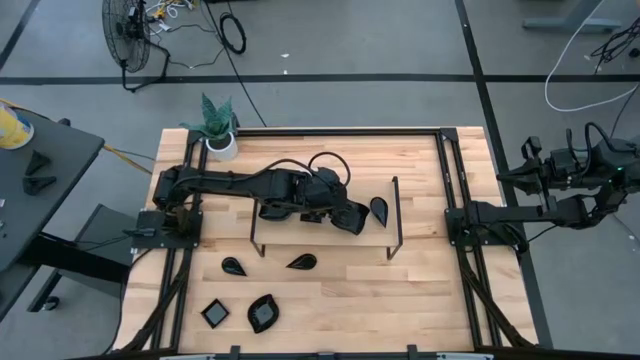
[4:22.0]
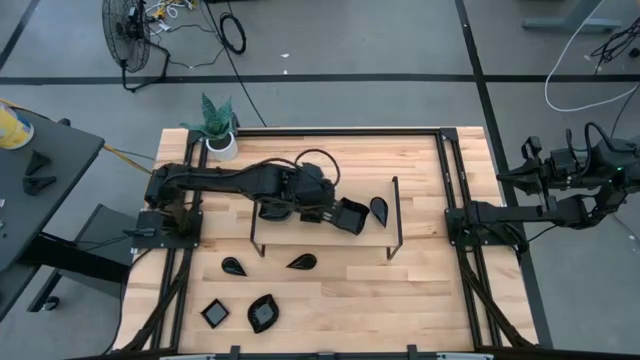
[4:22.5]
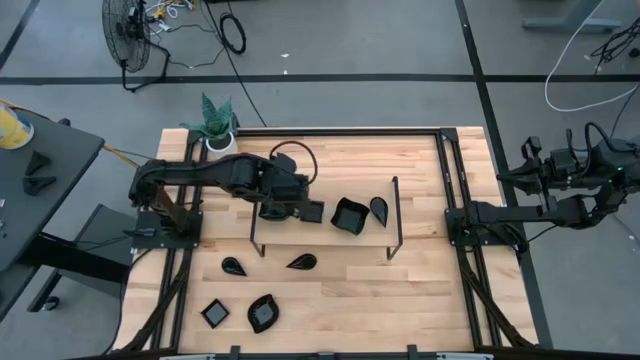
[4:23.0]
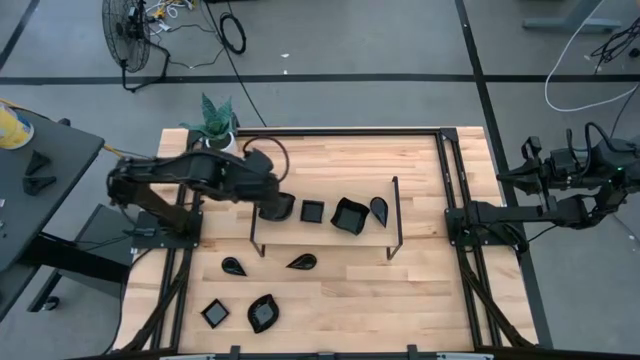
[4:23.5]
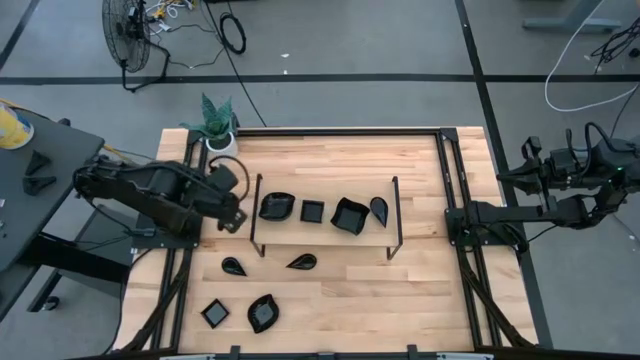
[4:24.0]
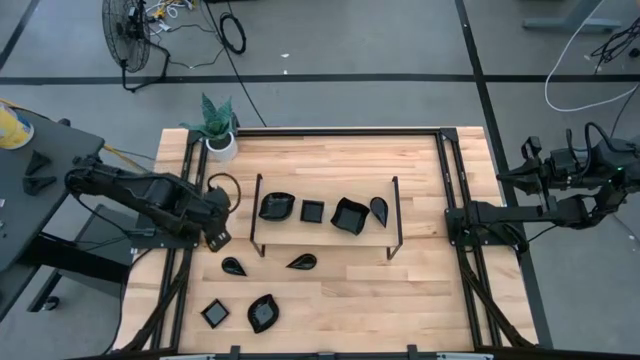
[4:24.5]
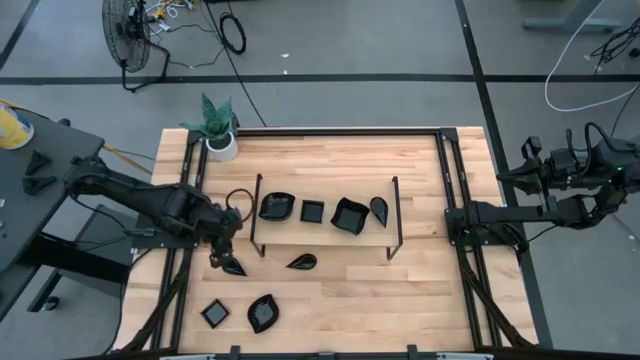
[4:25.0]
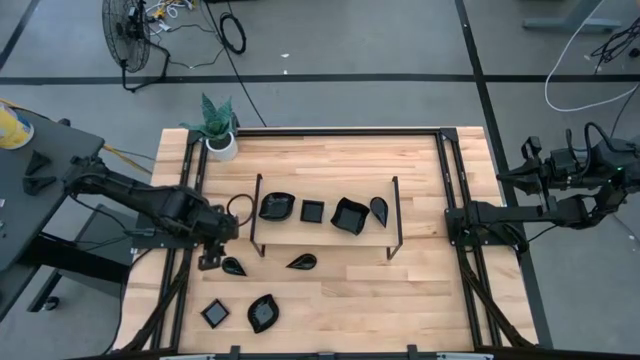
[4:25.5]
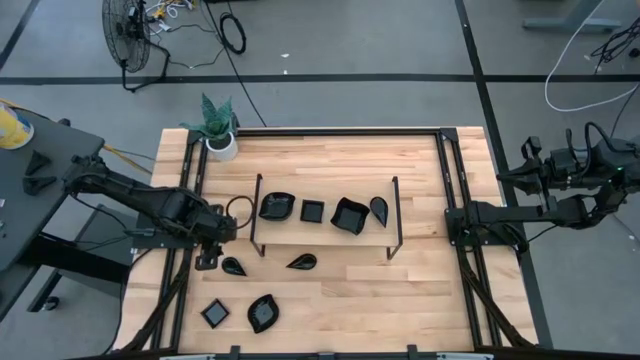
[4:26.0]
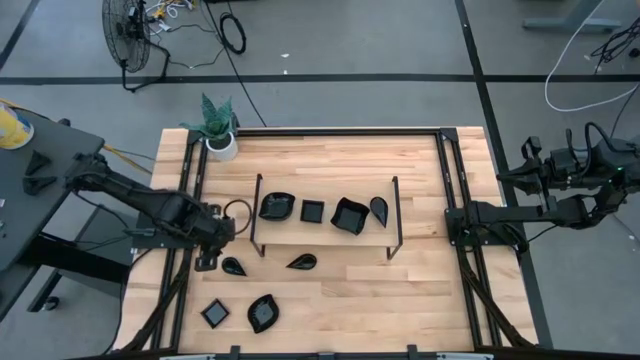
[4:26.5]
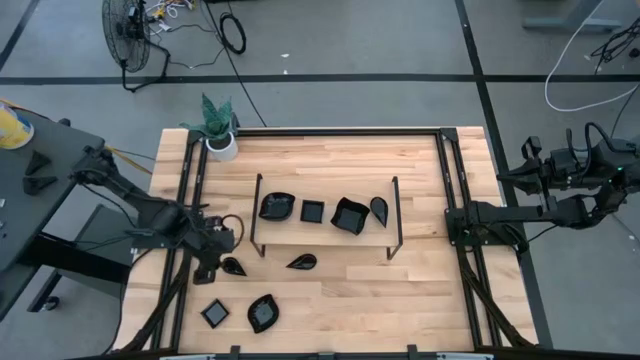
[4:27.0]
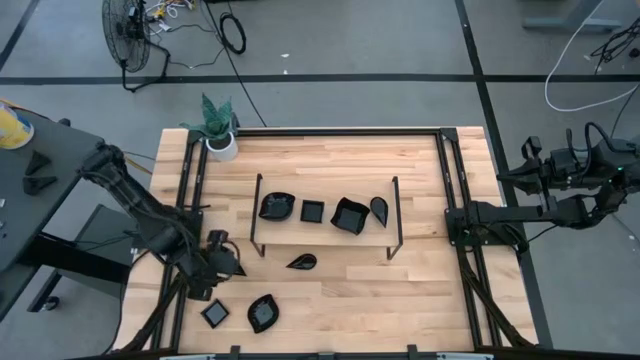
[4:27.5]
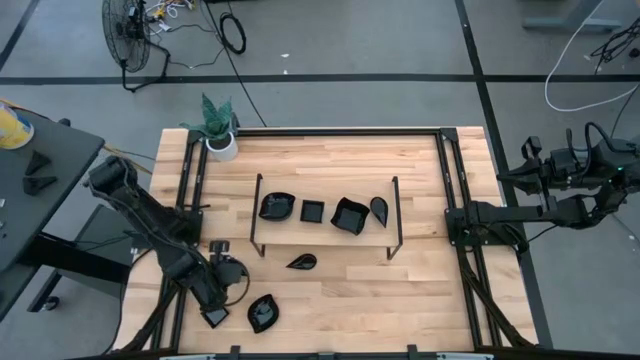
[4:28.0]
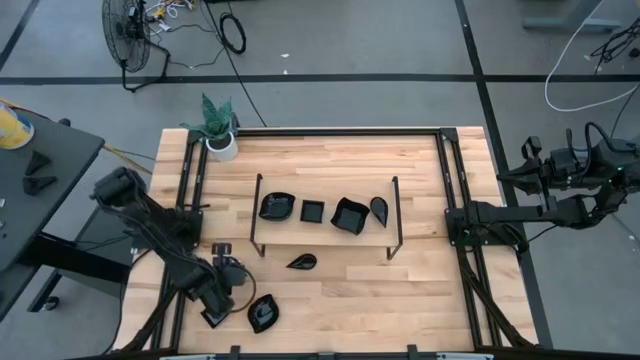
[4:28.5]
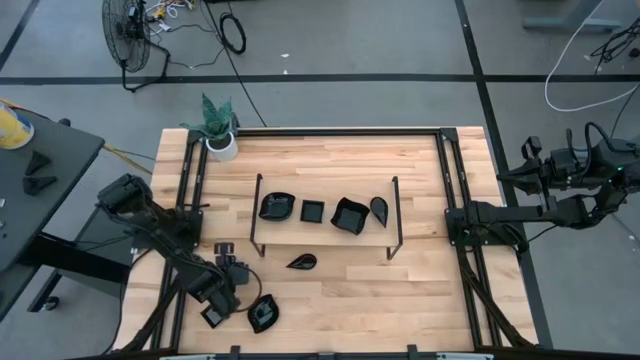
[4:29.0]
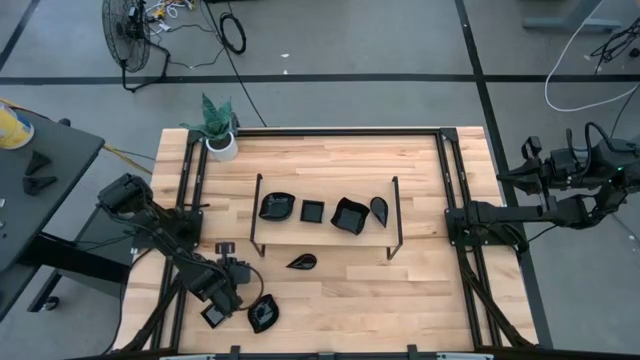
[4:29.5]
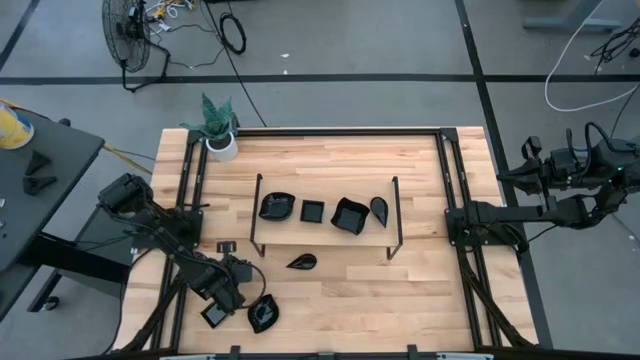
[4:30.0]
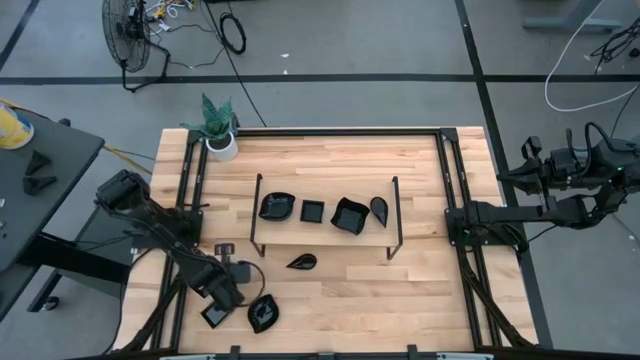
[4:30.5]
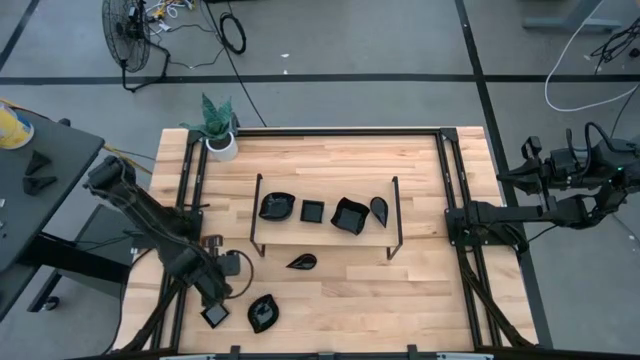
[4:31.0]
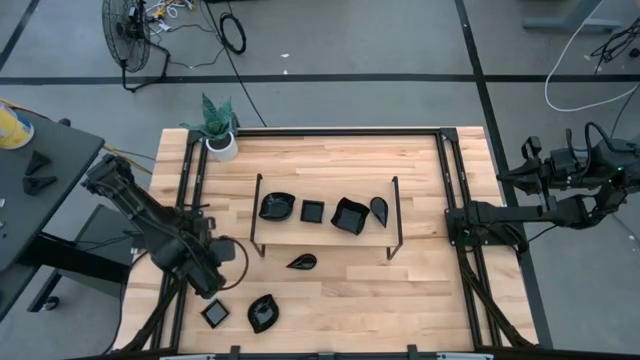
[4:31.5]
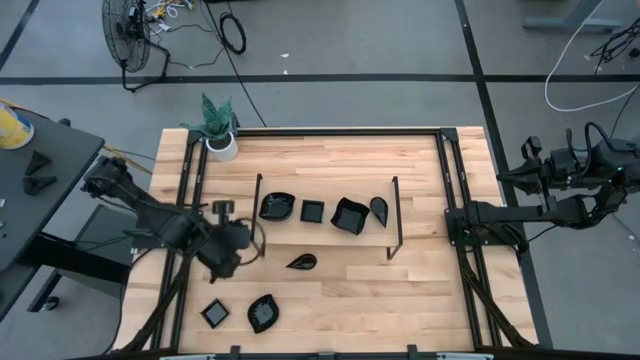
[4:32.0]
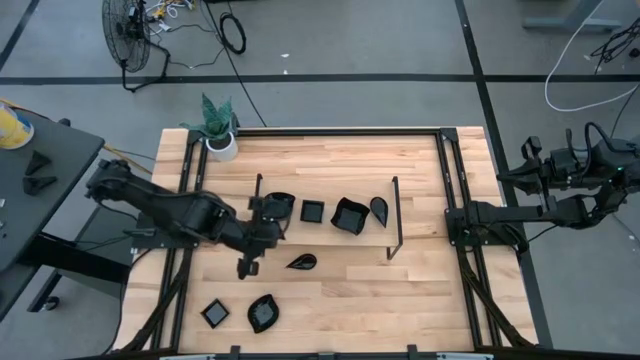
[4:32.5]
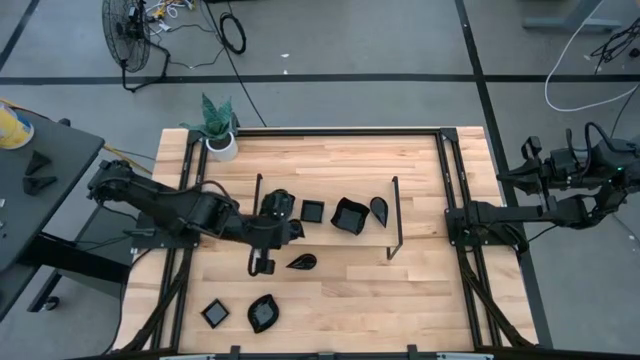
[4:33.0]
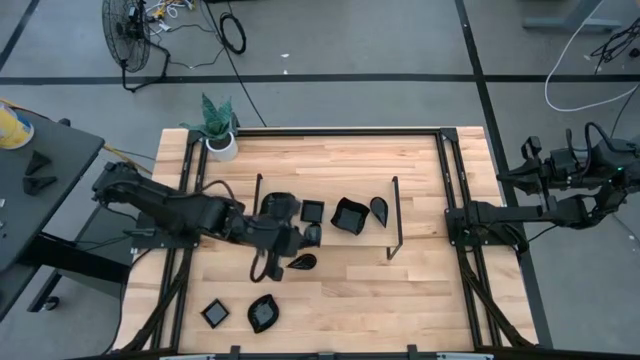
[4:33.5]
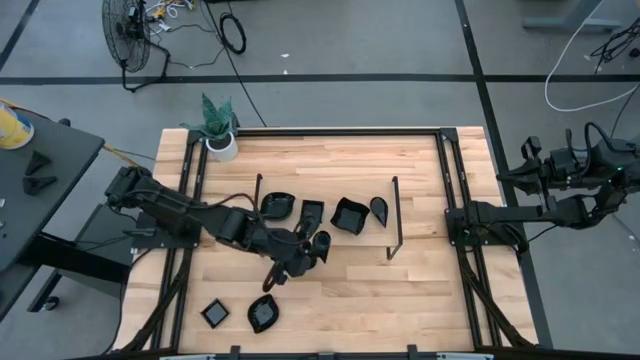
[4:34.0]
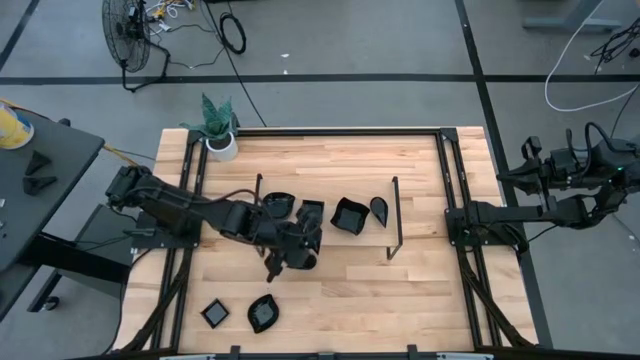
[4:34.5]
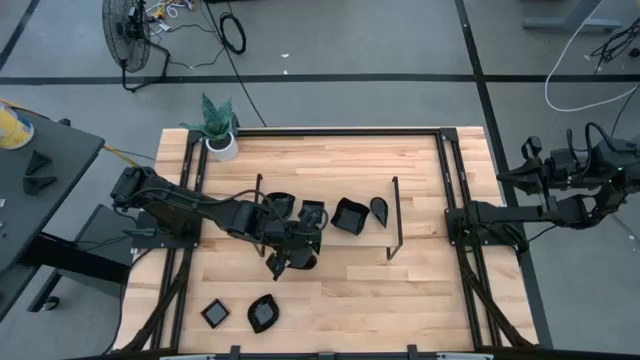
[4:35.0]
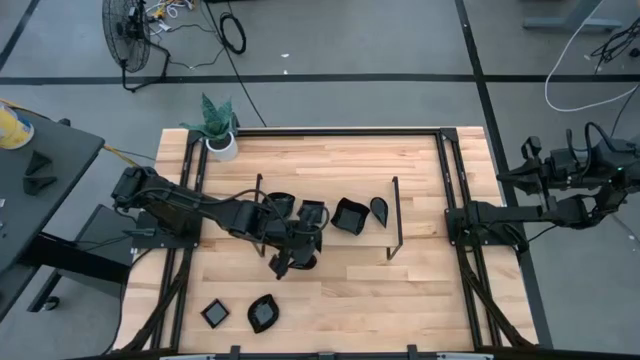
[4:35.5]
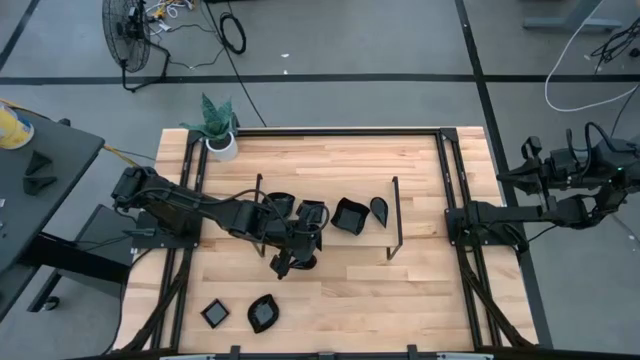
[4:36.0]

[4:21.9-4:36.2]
Task: Pick & Place Mini shaped plates
Stack the drop shaped plate on top of the drop shaped plate on the shelf

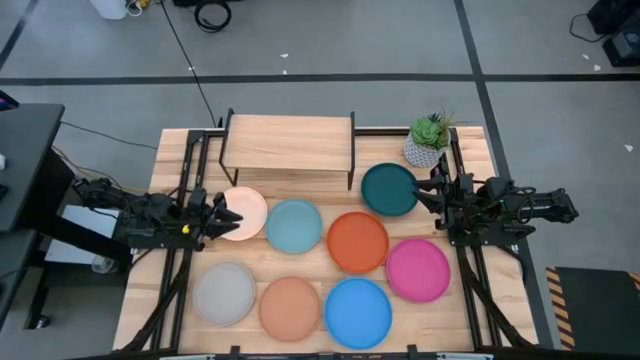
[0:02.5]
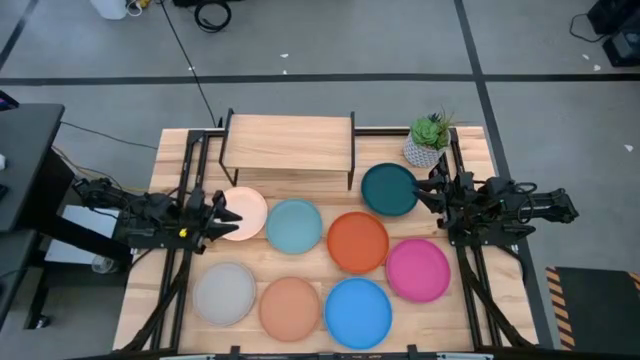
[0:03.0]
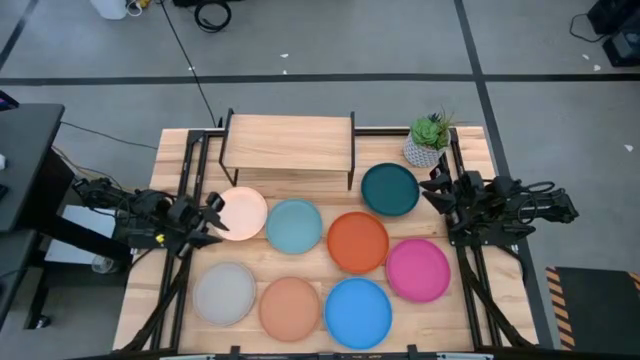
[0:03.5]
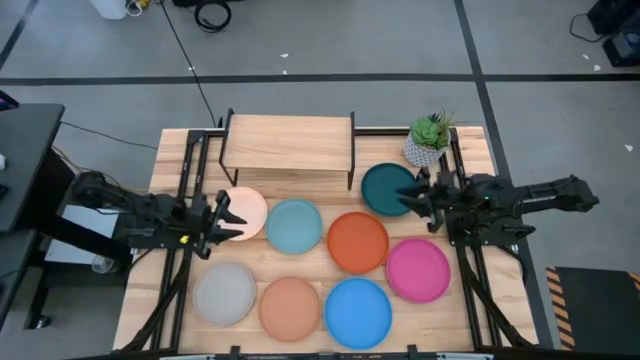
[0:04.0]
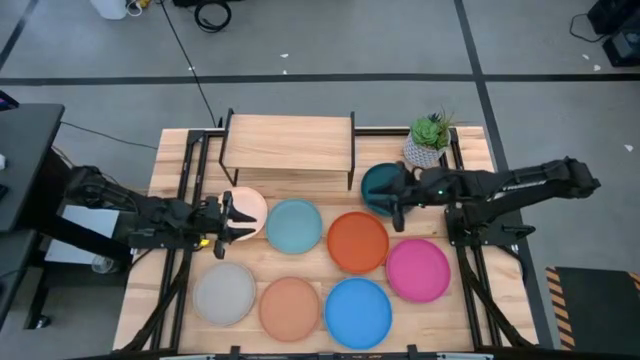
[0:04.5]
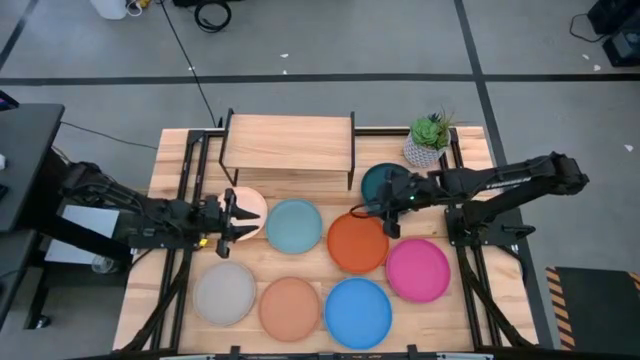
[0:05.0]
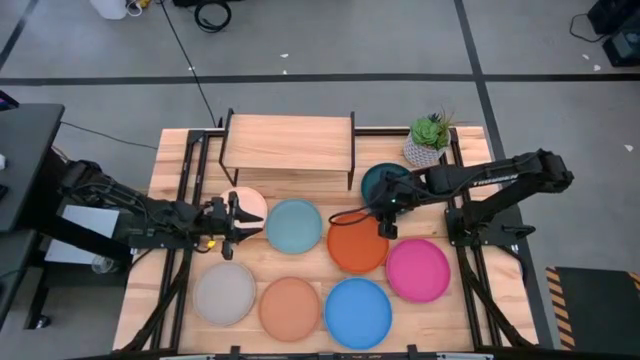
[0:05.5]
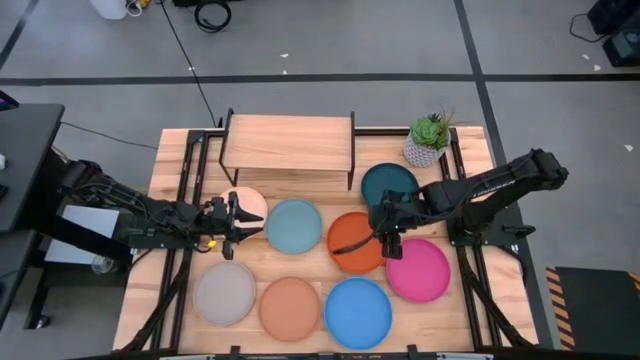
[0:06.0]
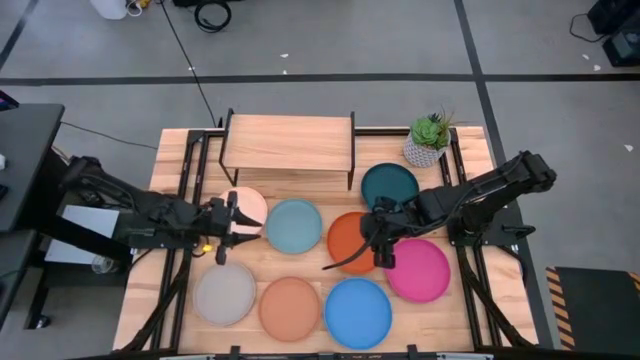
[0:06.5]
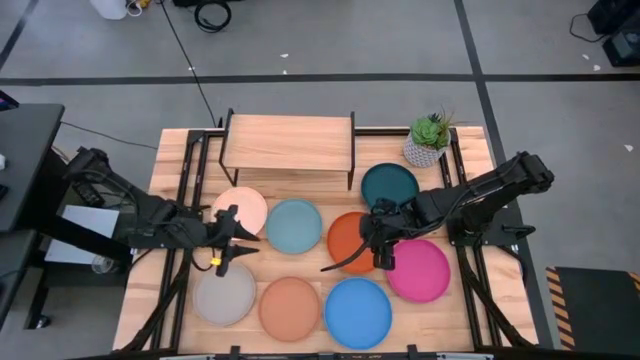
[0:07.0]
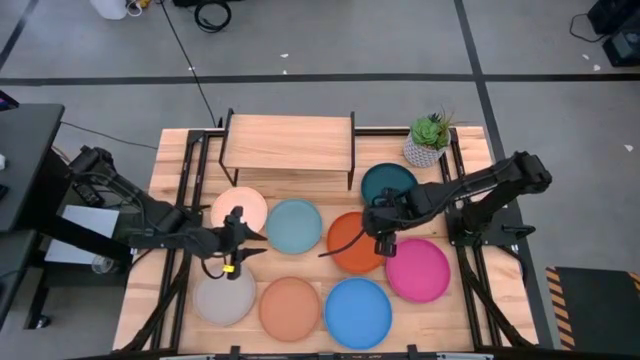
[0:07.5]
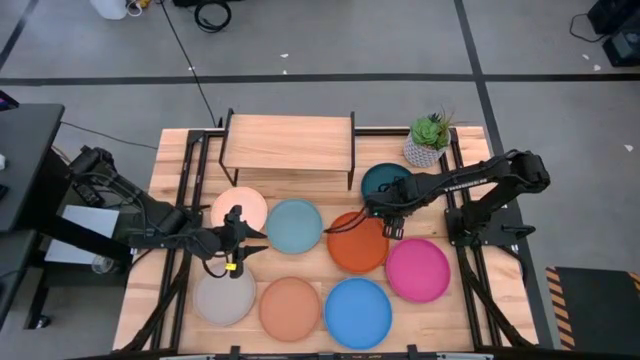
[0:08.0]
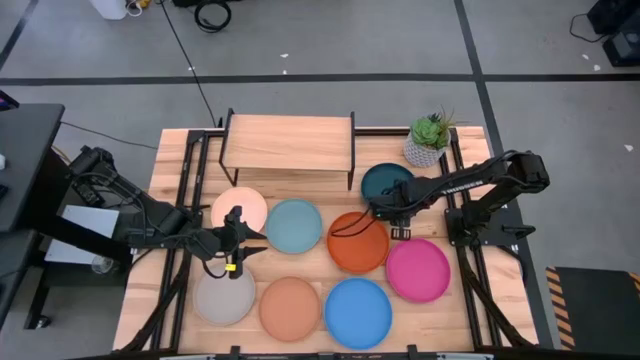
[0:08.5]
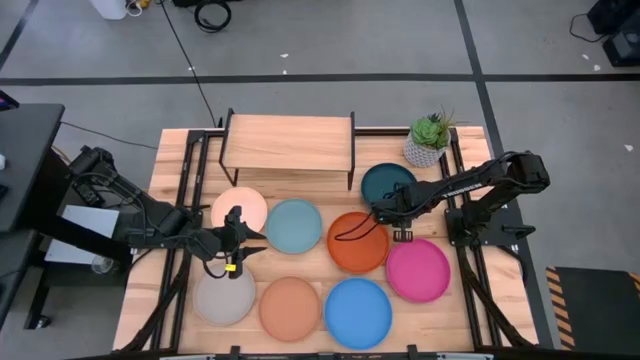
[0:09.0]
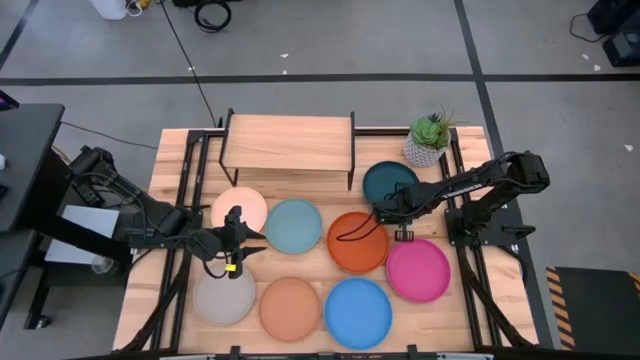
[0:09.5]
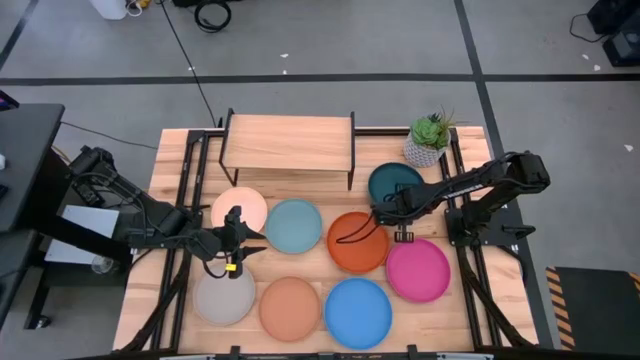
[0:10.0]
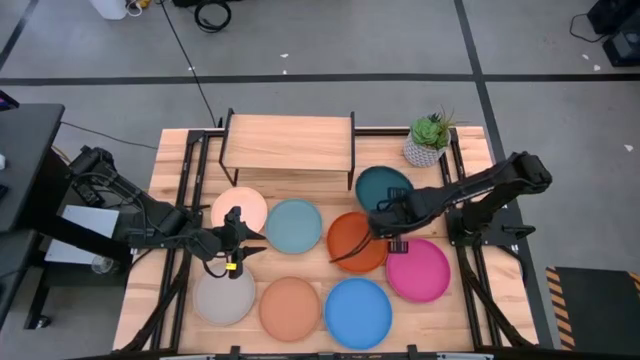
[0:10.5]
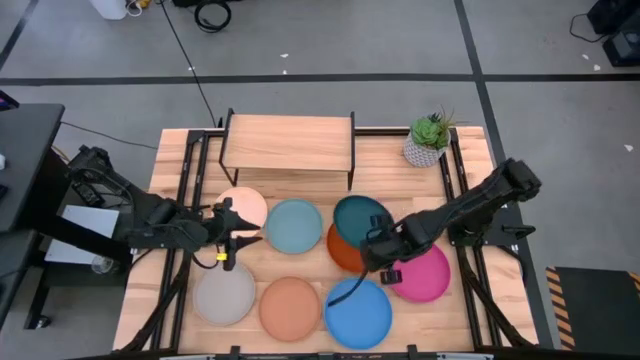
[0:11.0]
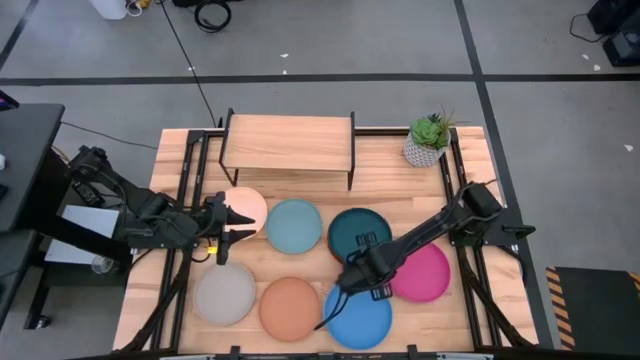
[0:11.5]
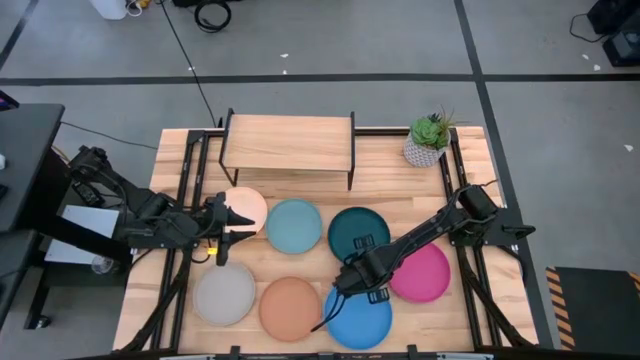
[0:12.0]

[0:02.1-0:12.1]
Task: Place and stack plates onto a shelf
Stack the dark green plate on the orange plate
